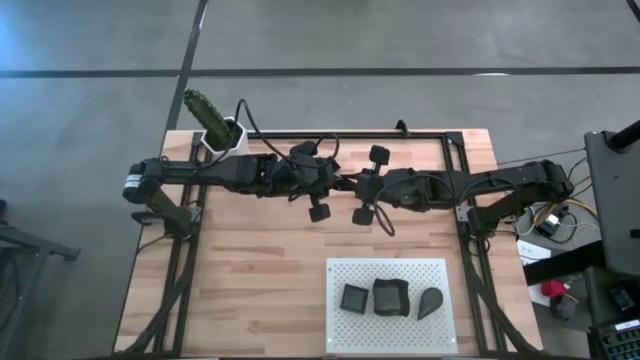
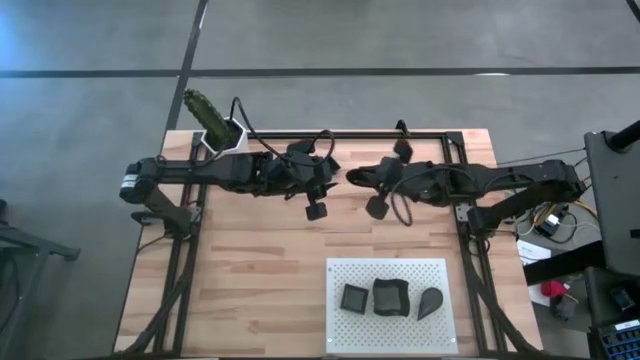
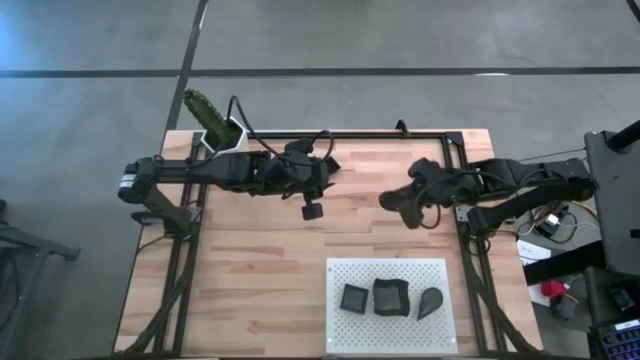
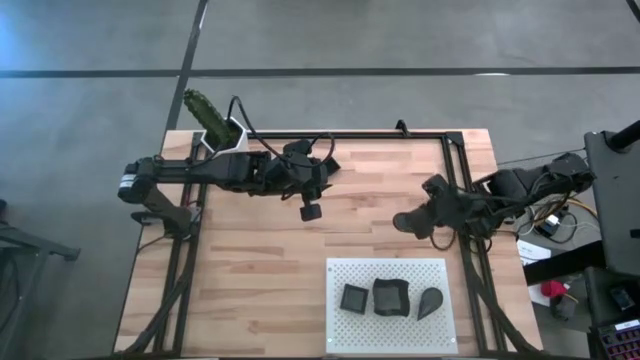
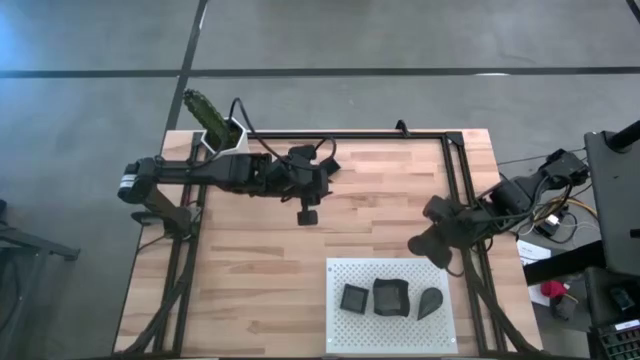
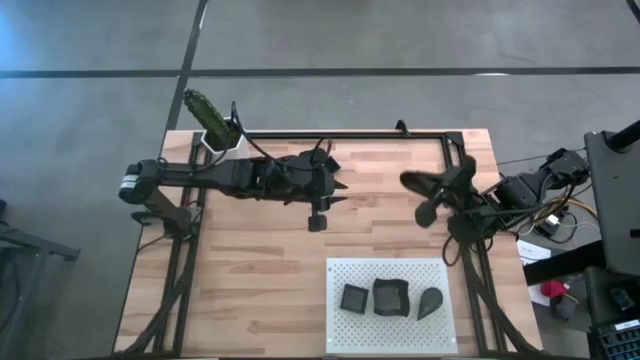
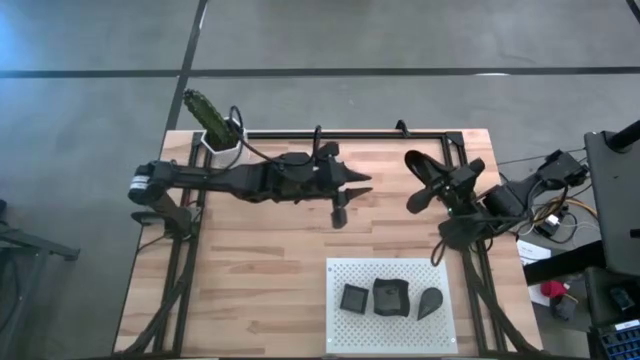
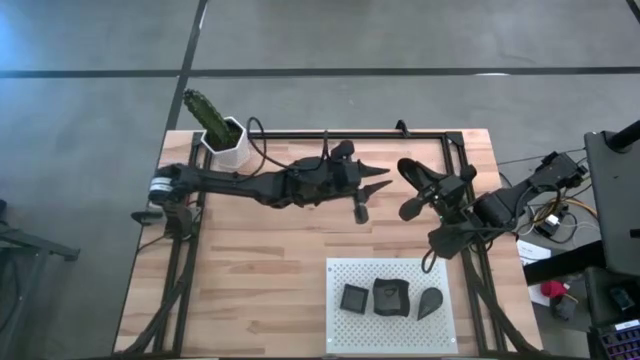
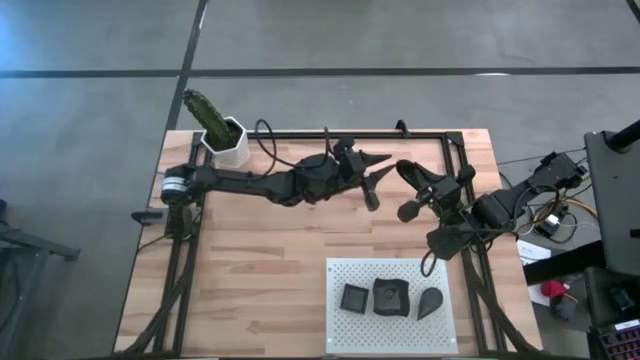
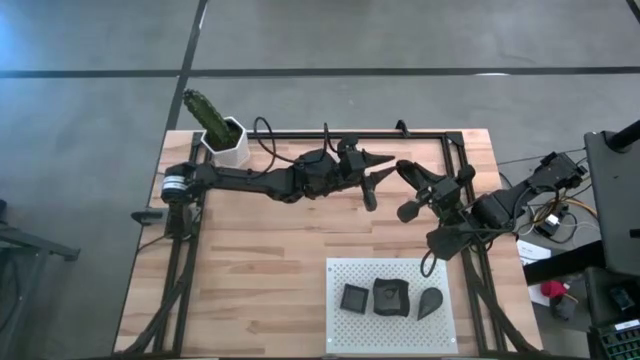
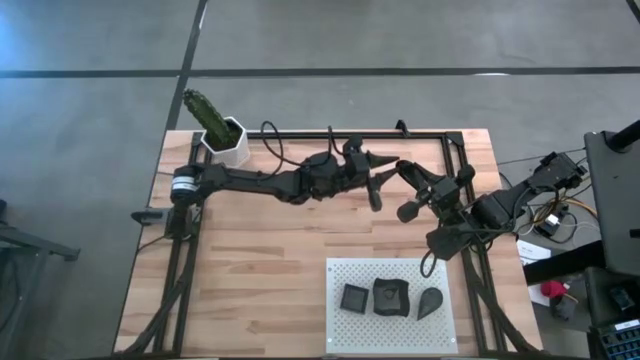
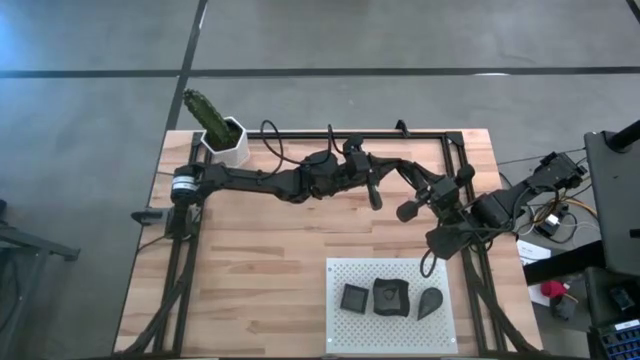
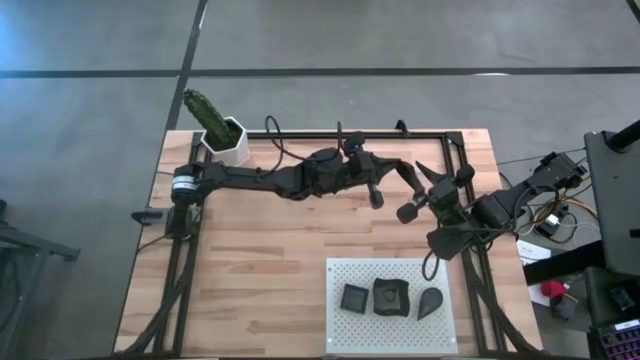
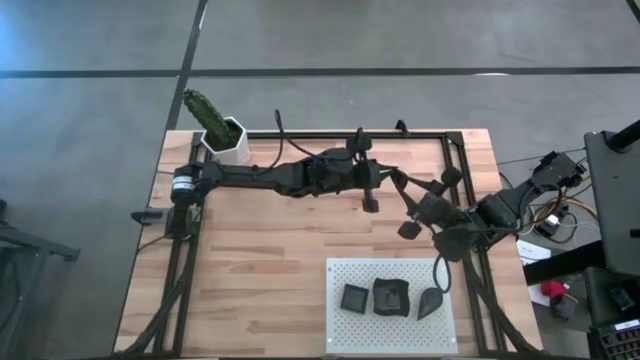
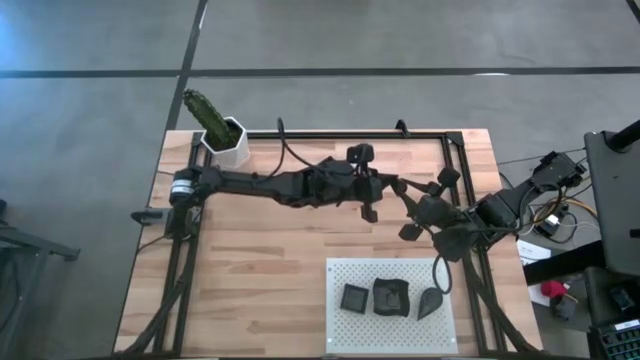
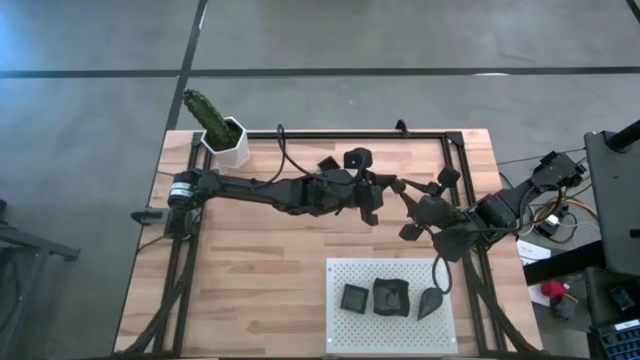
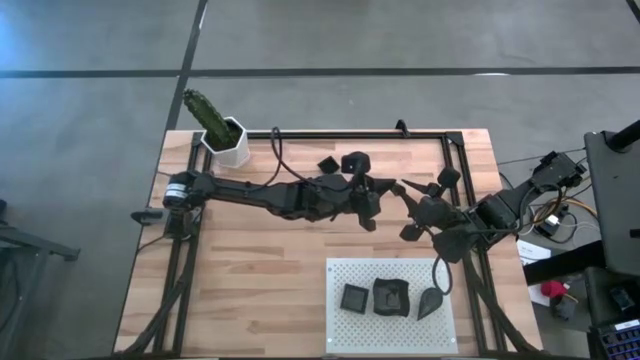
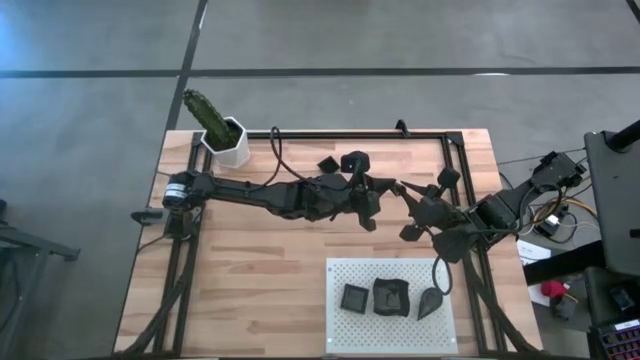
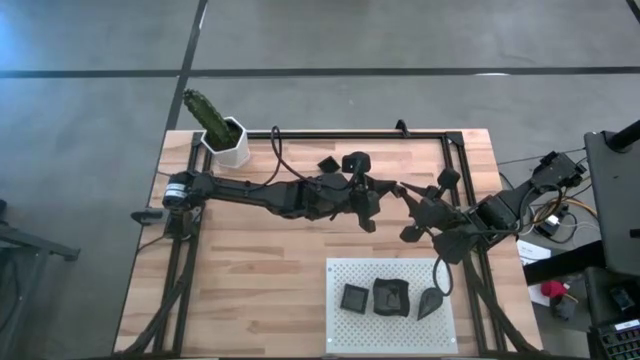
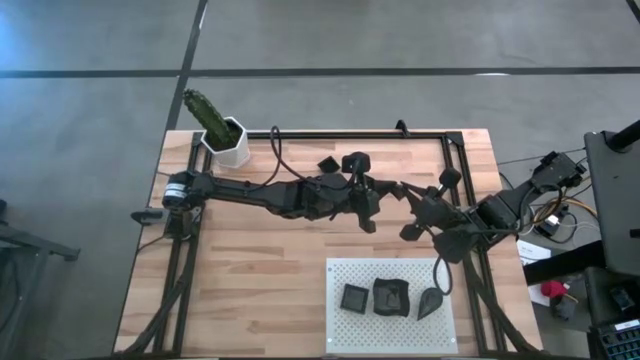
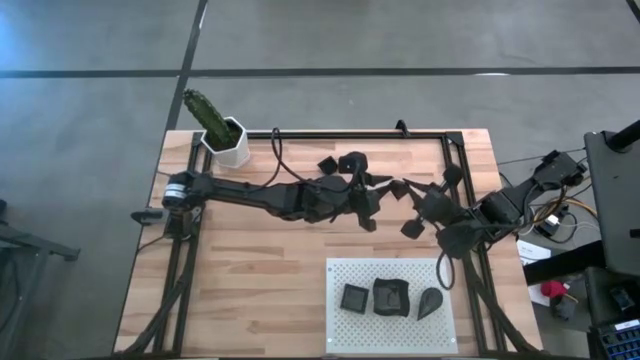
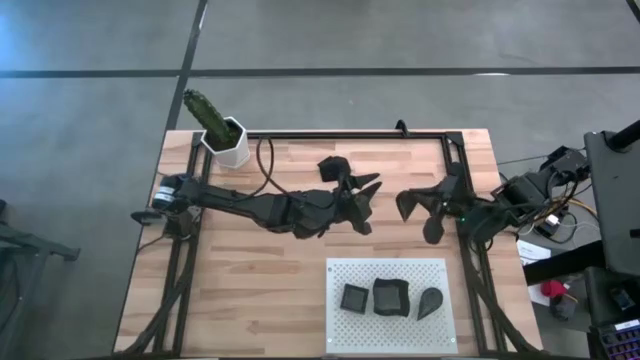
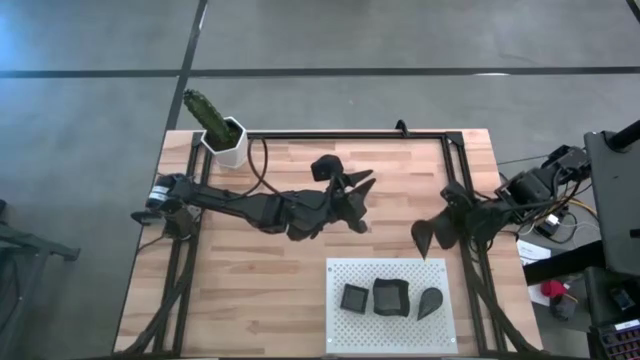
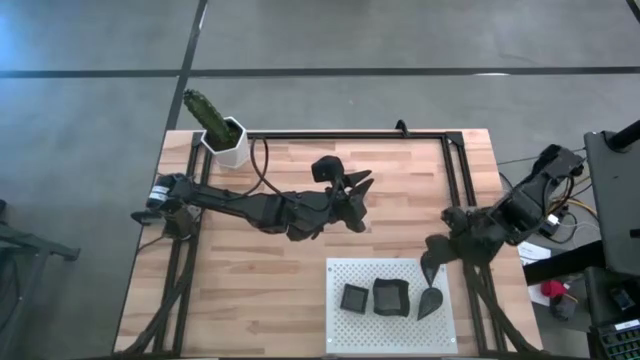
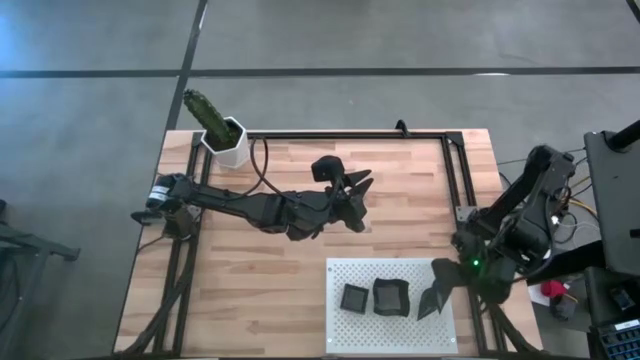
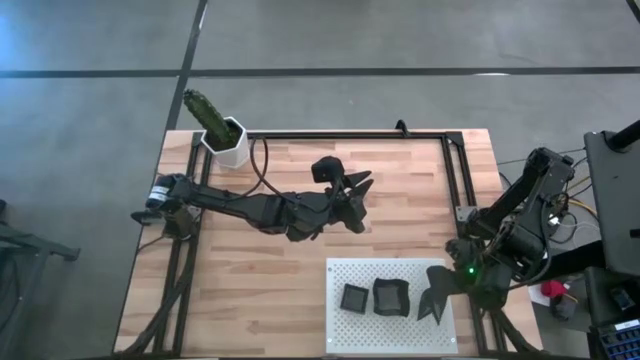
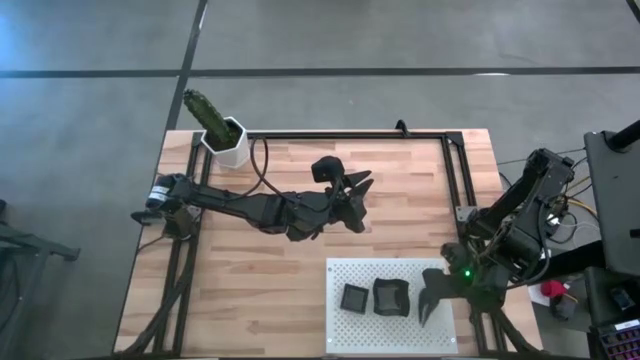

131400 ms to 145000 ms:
Task: Pick & Place Mini shaped plates
Stack the drop-shaped plate on top of the drop-shaped plate on the shelf

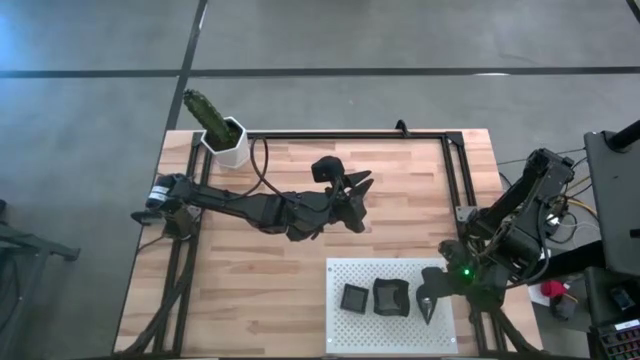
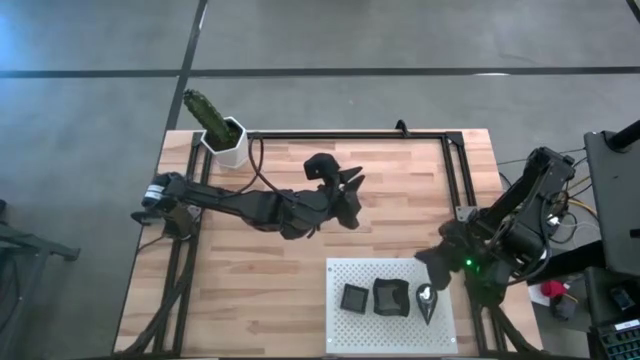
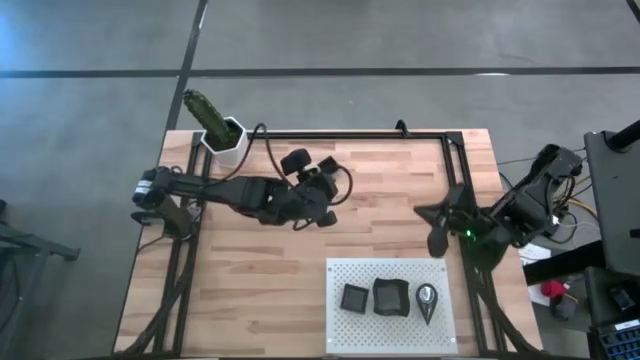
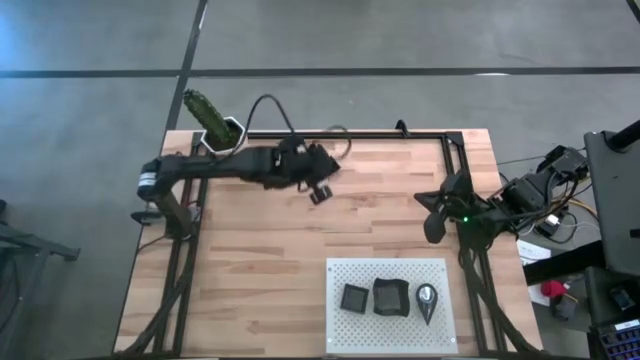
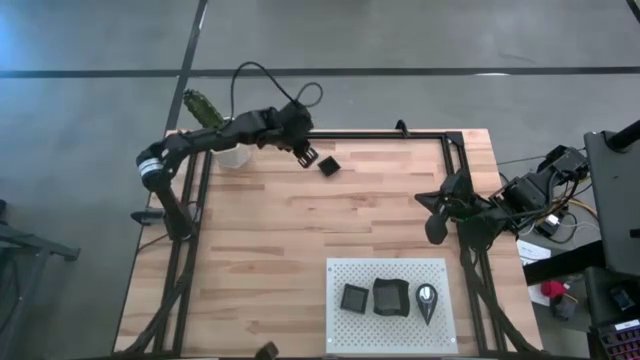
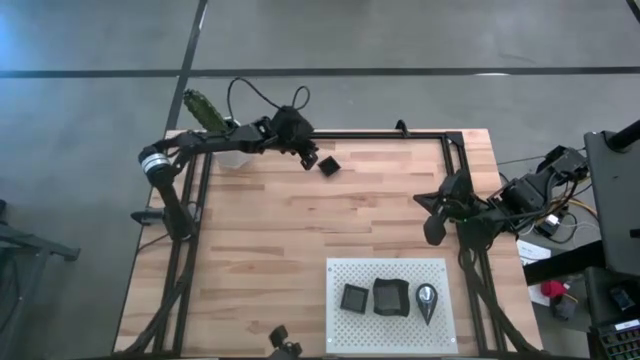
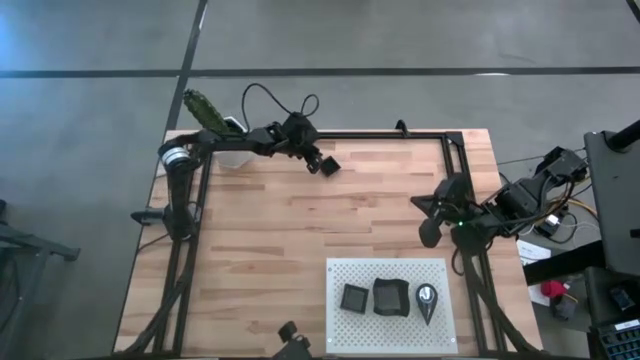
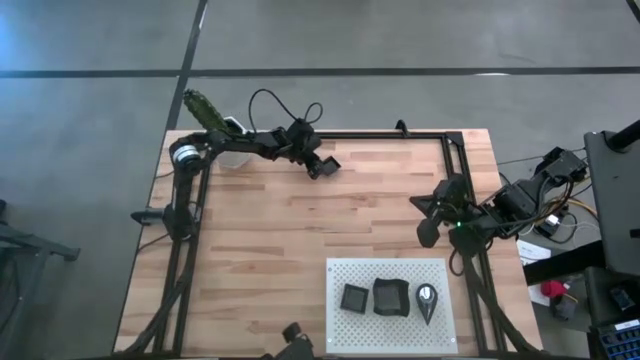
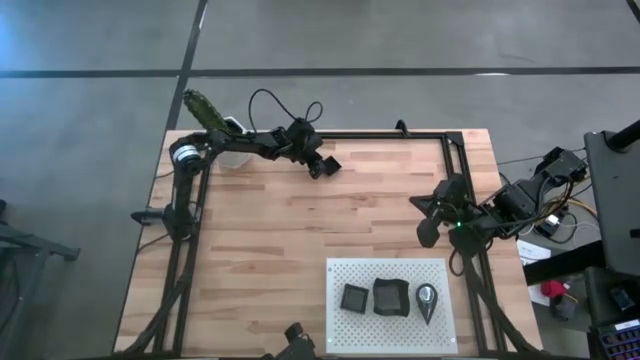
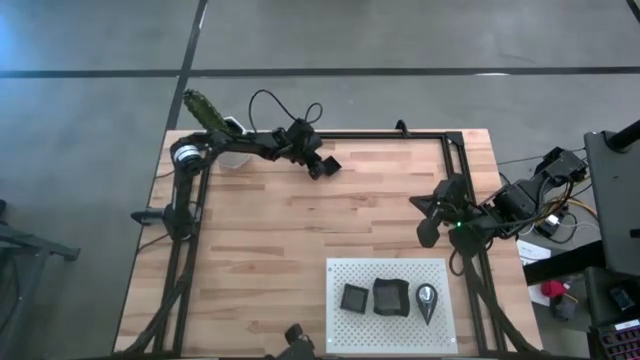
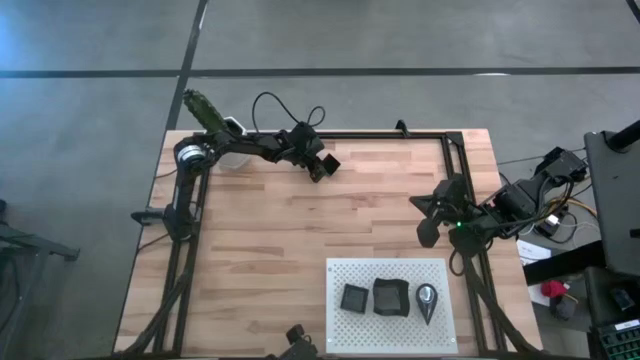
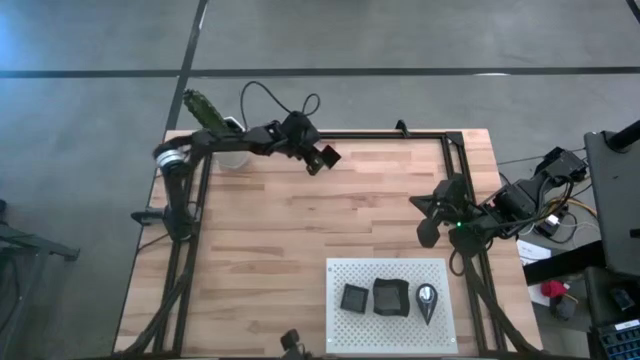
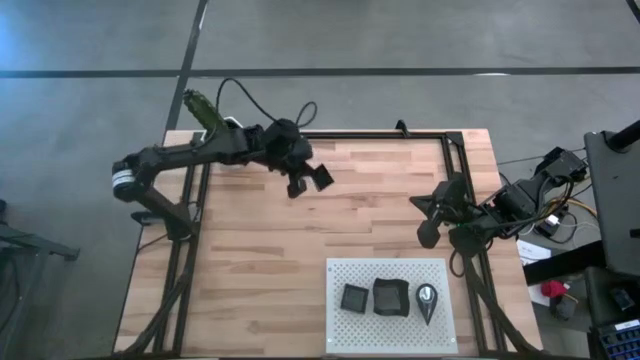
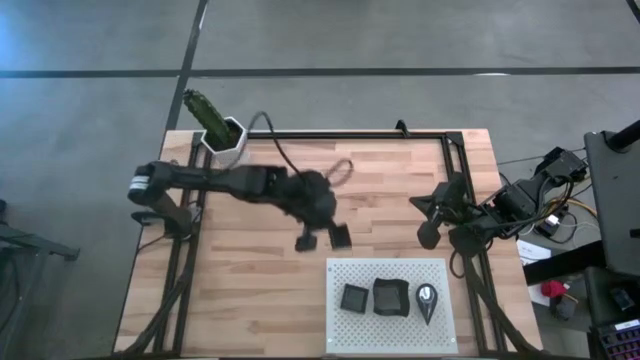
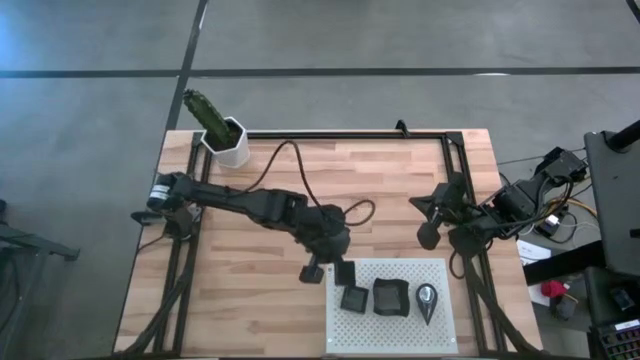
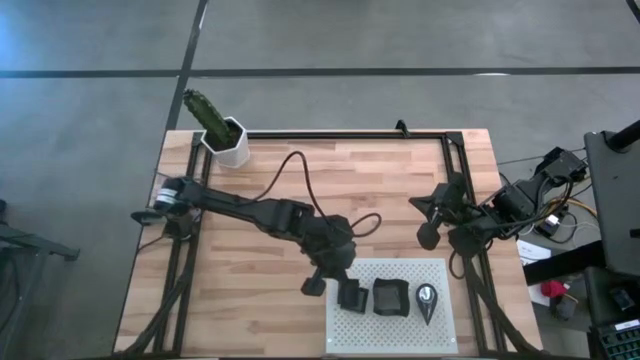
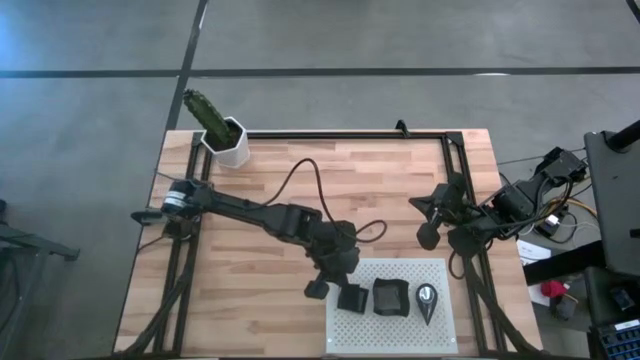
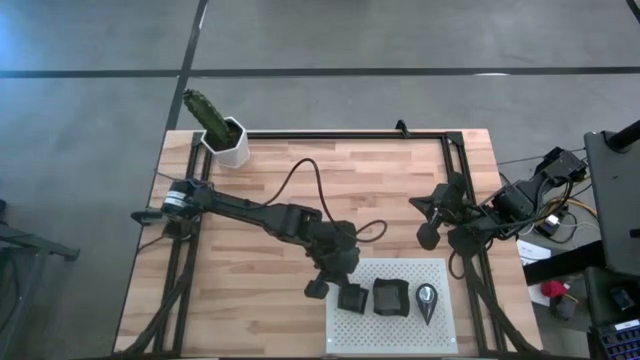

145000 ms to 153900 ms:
Stack the square plate on top of the square plate on the shelf
